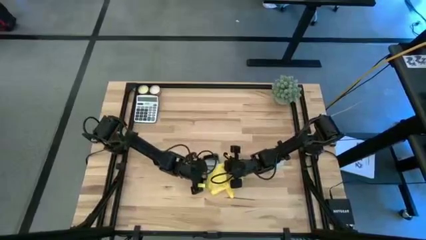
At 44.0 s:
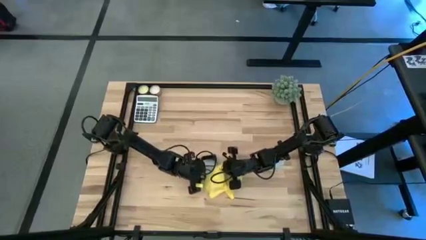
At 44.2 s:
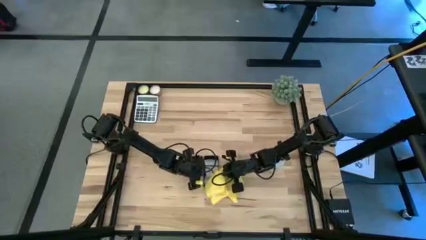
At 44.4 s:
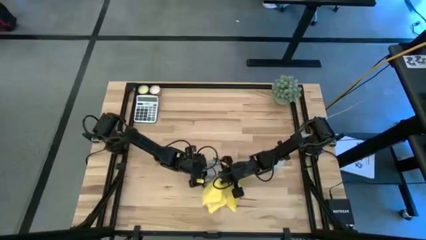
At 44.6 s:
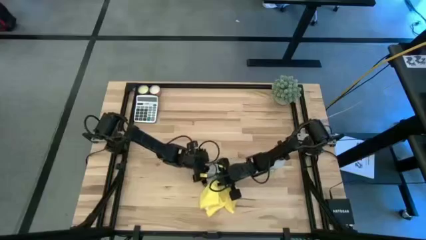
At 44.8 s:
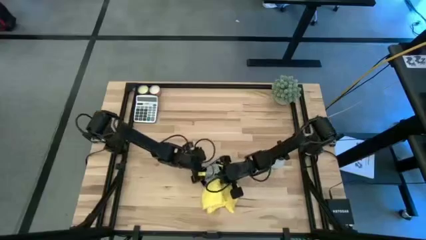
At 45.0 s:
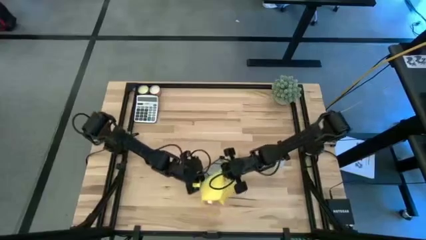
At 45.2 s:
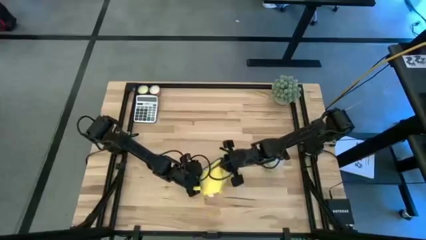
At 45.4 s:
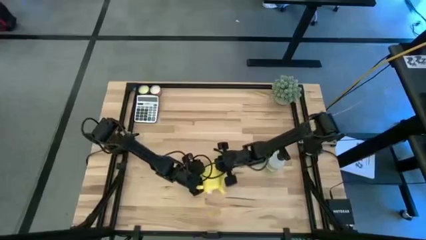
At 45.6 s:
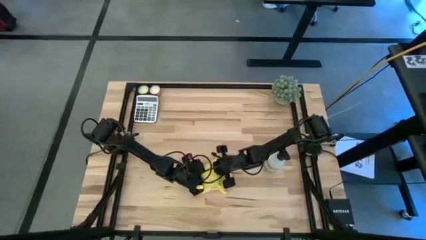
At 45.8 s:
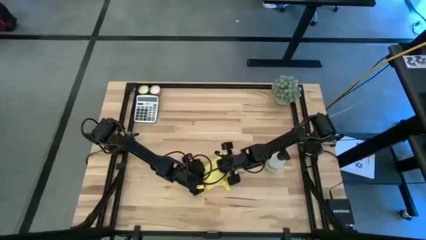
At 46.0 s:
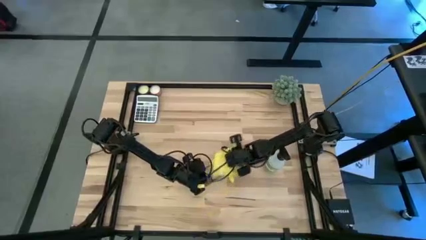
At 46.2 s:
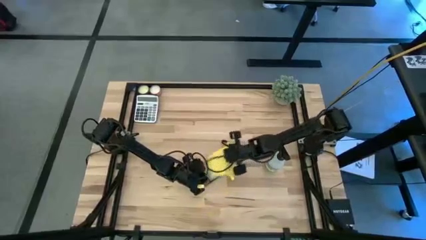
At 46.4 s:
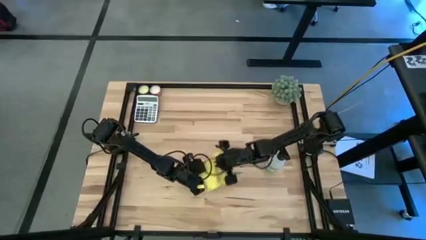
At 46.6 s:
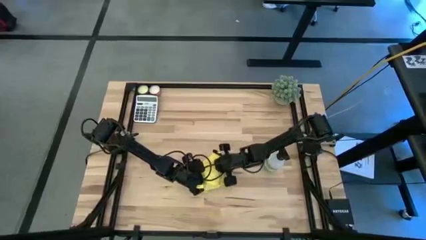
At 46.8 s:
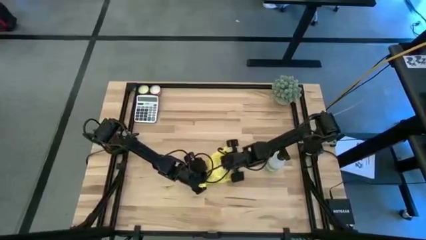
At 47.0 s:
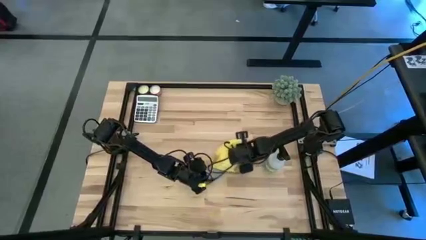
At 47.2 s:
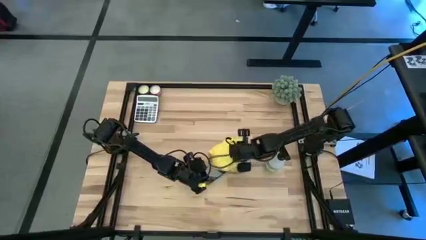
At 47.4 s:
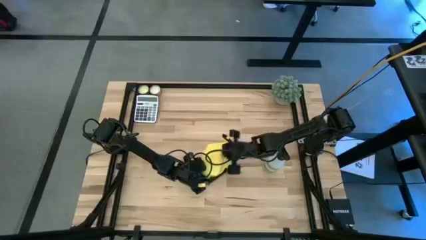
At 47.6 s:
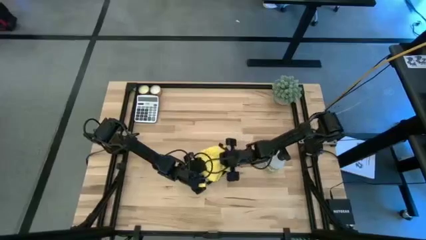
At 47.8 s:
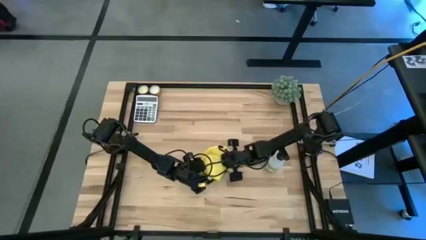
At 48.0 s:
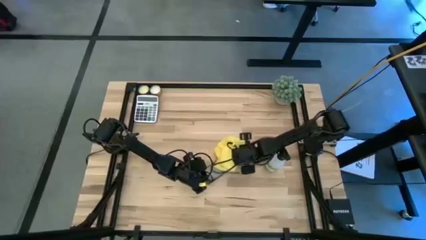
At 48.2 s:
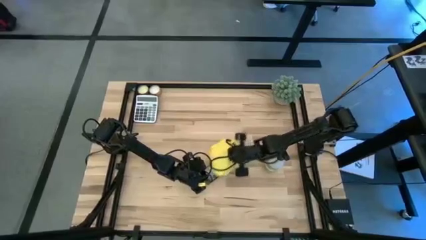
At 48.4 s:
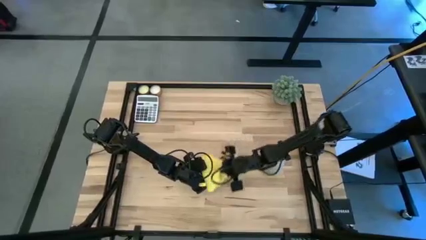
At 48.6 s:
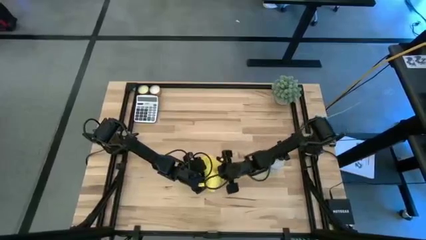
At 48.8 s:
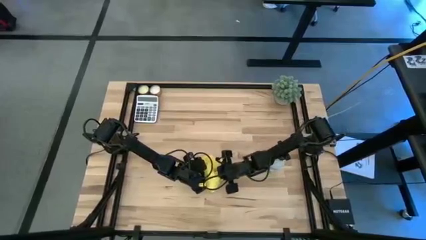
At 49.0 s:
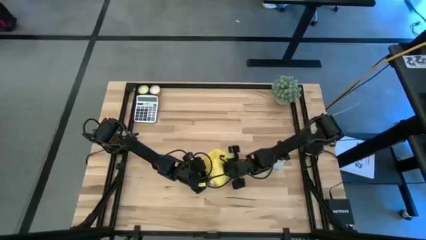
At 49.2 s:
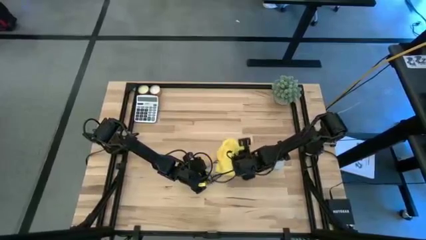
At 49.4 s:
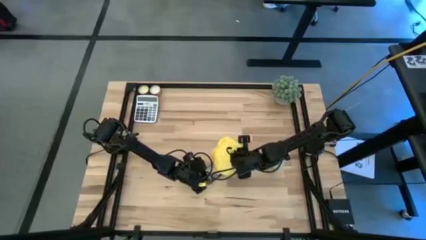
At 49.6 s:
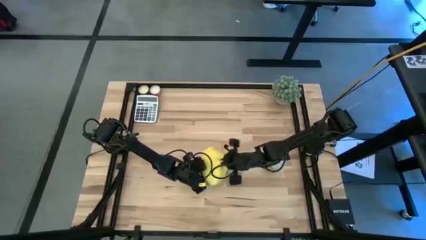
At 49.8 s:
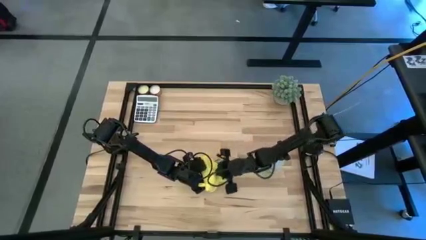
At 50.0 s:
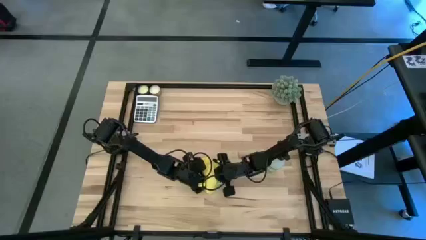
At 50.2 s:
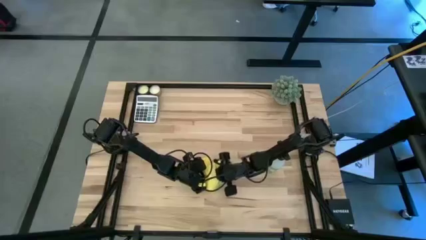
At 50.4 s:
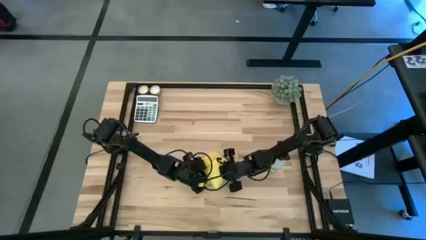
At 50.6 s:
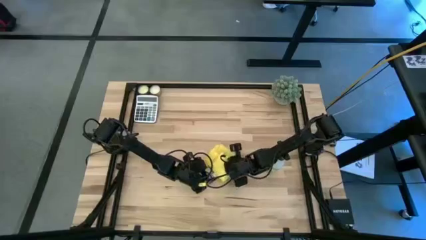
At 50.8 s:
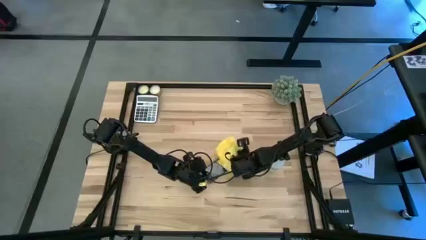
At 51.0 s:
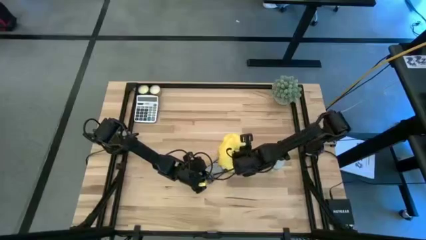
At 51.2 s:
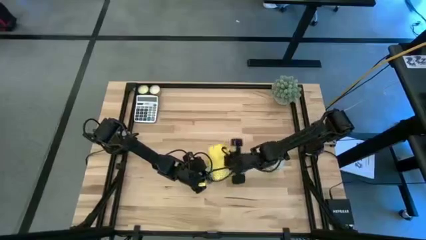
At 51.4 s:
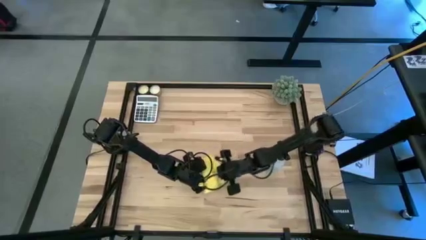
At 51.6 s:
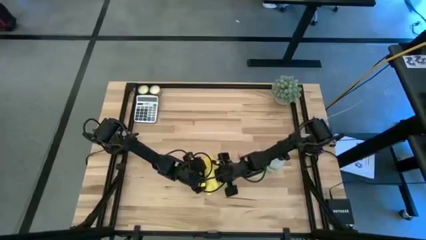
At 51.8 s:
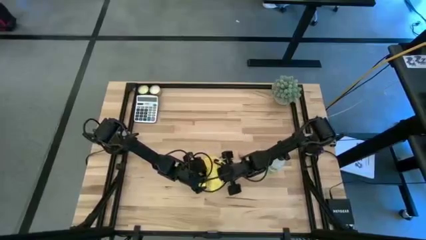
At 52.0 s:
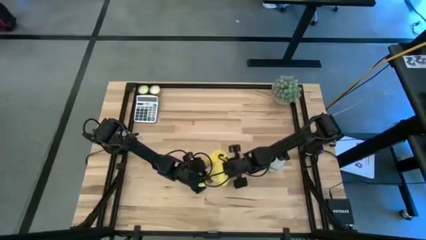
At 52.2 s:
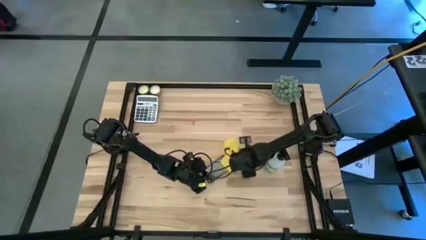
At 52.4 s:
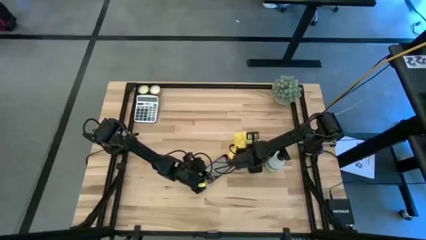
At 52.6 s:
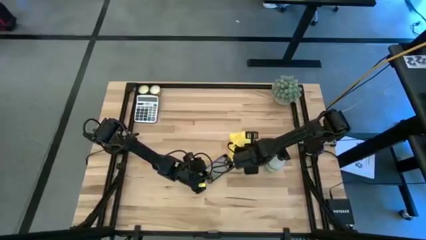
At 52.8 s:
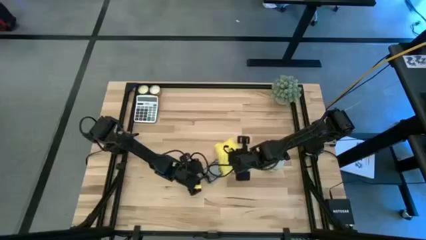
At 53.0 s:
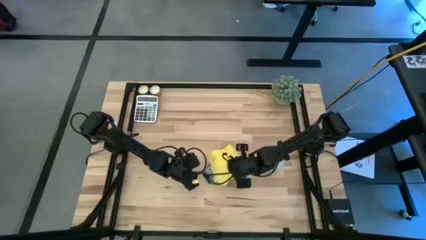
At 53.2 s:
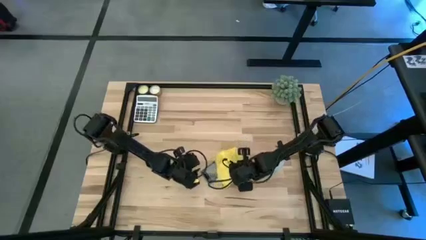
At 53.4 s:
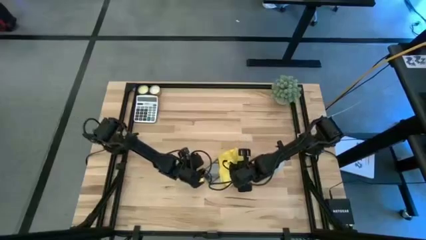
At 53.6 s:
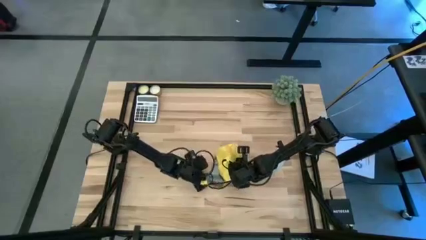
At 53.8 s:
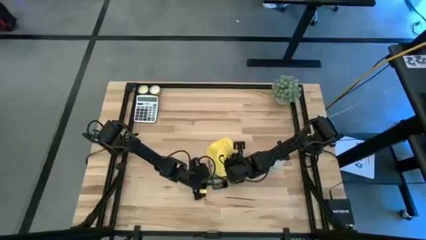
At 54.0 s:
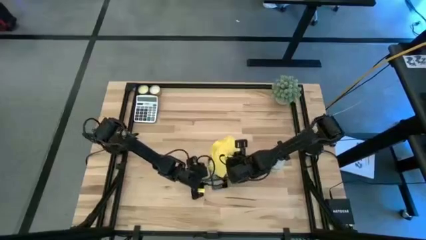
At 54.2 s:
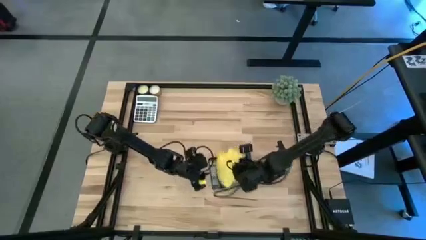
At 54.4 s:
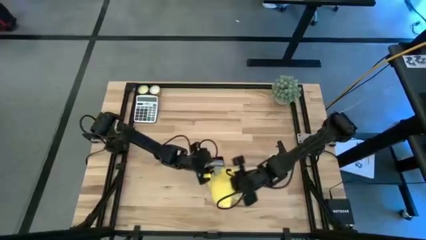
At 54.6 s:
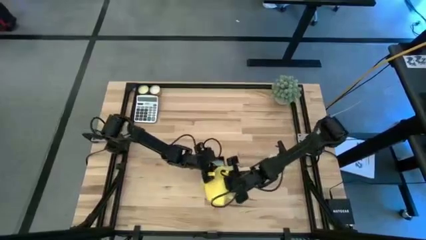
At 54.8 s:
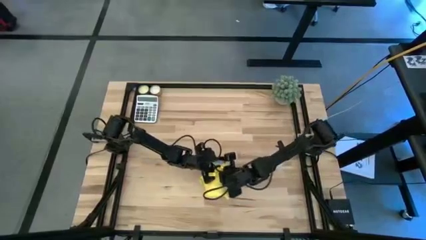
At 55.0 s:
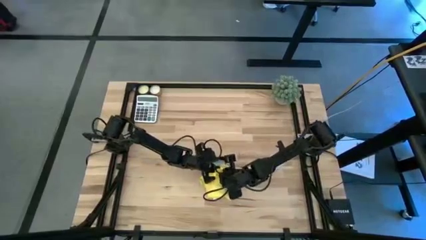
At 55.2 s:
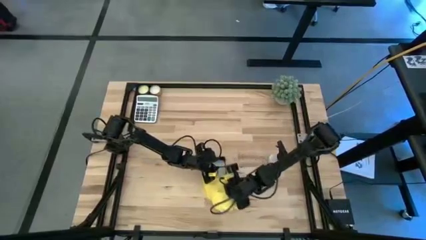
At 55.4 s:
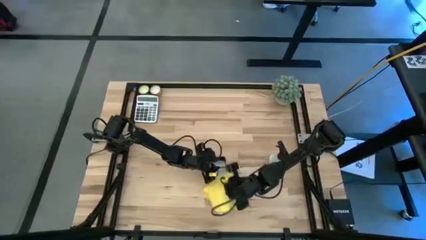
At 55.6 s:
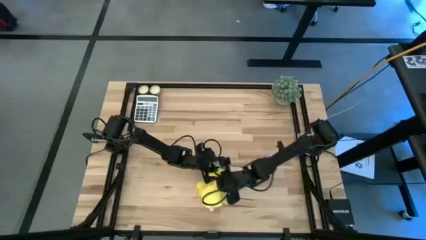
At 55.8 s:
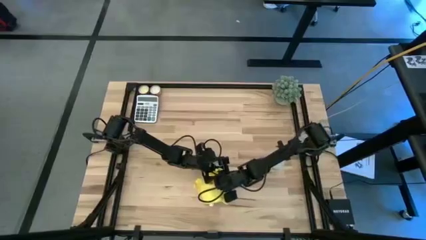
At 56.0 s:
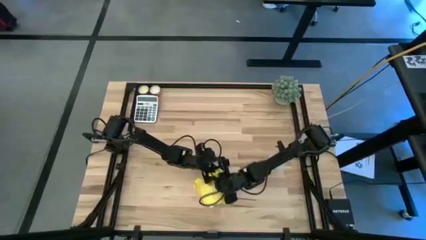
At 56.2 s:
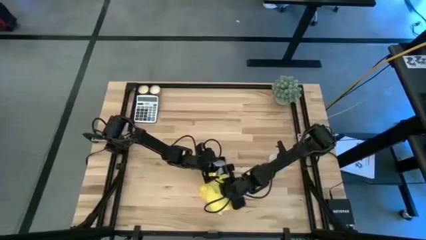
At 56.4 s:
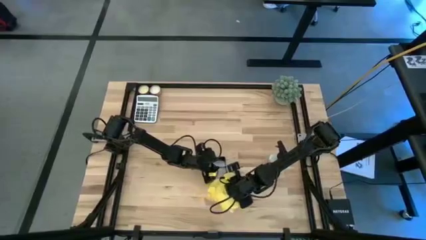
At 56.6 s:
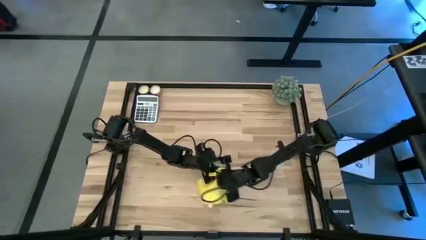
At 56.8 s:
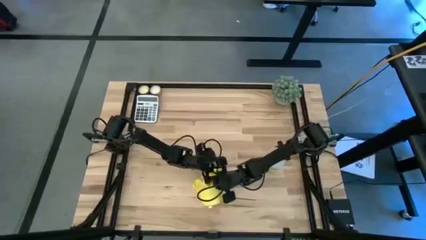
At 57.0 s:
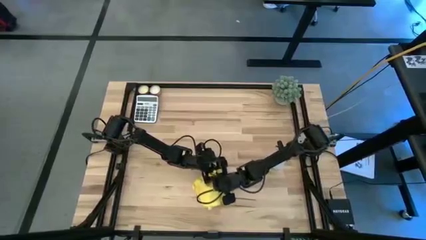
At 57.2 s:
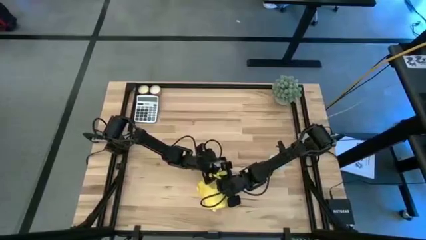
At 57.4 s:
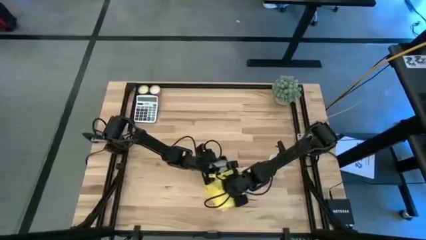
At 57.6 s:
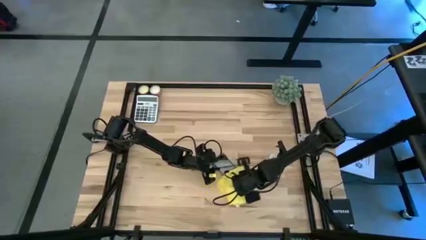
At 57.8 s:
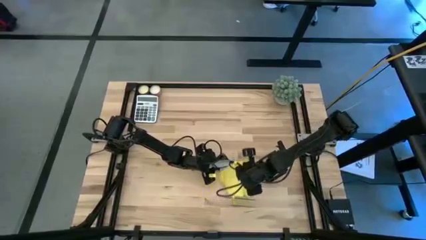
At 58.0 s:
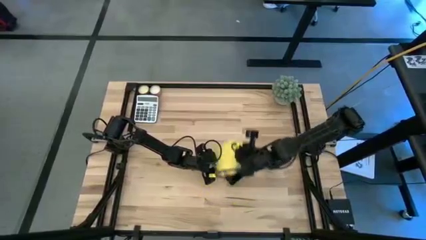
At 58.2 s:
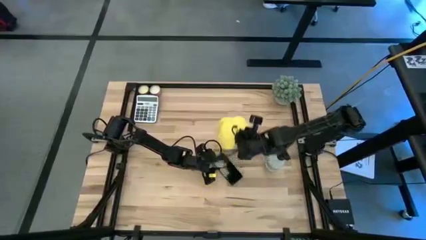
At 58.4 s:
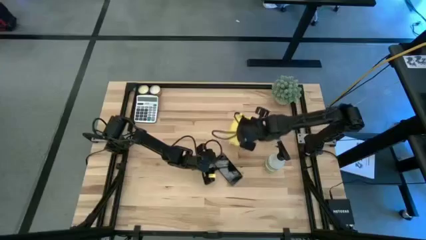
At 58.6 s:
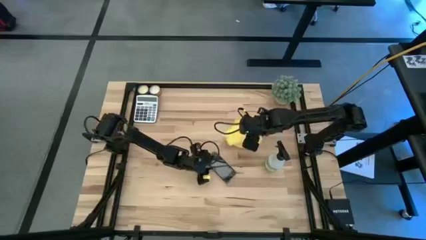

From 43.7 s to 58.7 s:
Task: Apply microfiber cloth
Wipe the front of the black cellphone with a yellow microfiber towel
